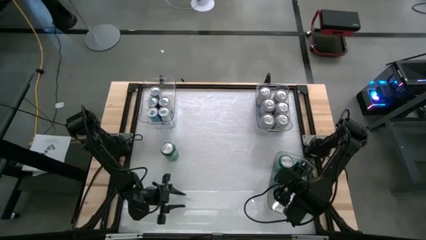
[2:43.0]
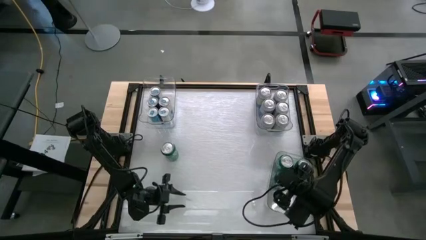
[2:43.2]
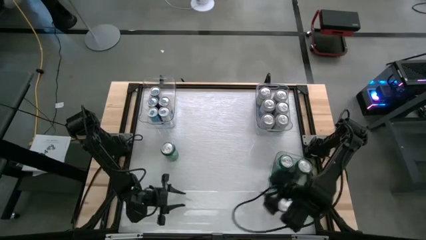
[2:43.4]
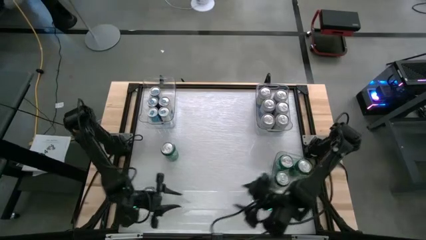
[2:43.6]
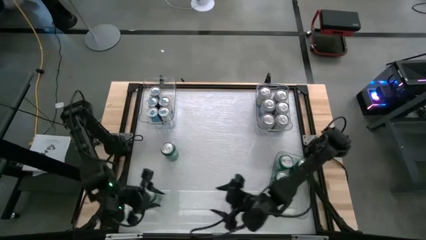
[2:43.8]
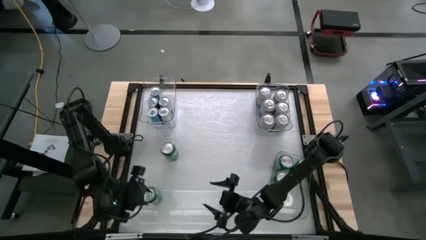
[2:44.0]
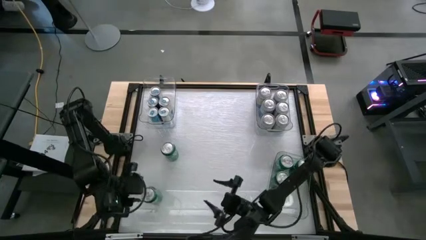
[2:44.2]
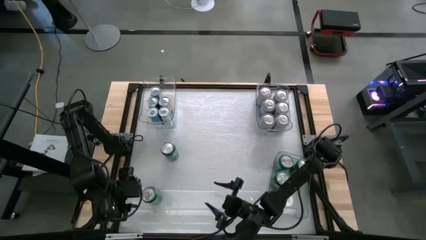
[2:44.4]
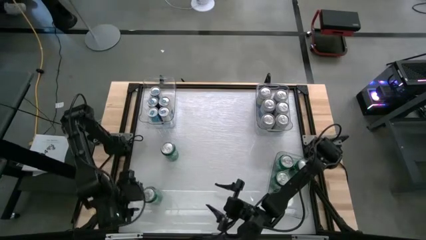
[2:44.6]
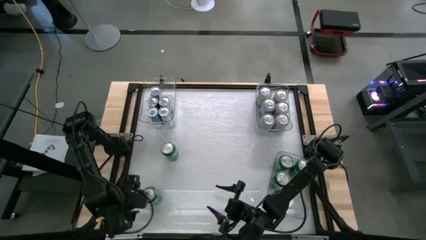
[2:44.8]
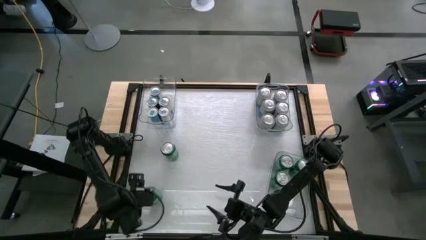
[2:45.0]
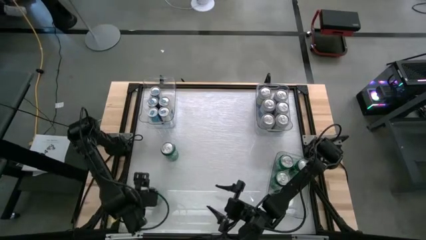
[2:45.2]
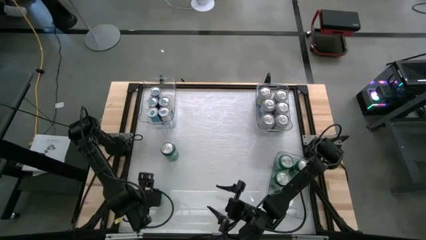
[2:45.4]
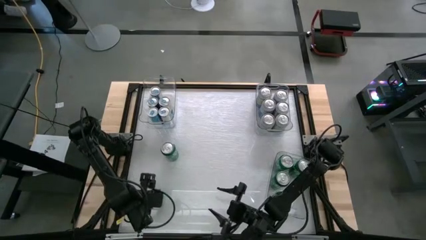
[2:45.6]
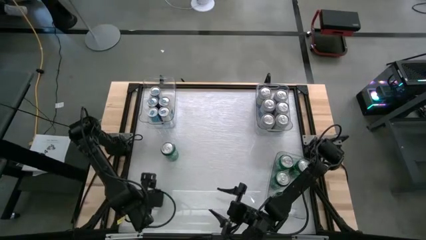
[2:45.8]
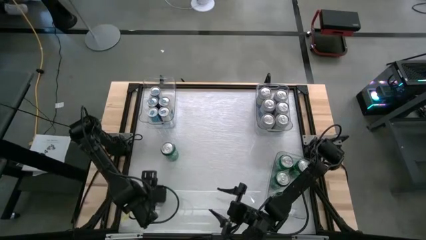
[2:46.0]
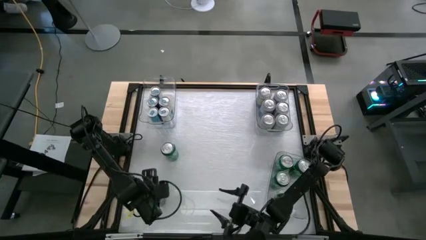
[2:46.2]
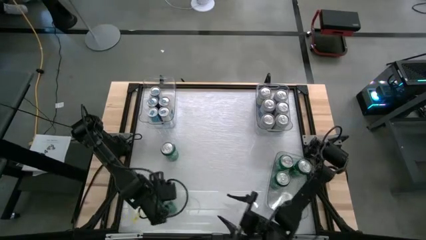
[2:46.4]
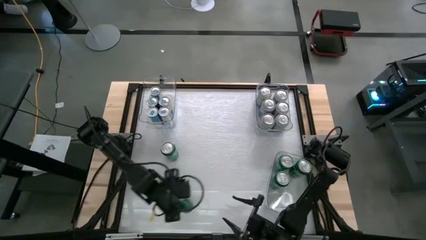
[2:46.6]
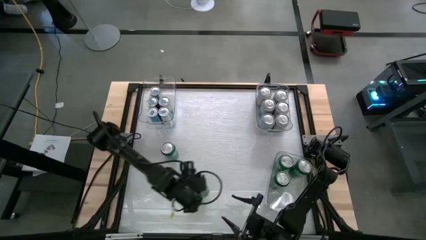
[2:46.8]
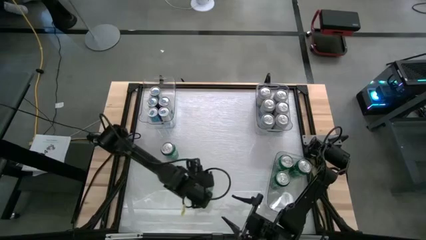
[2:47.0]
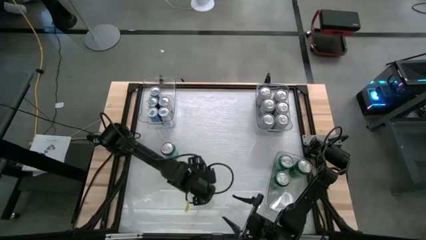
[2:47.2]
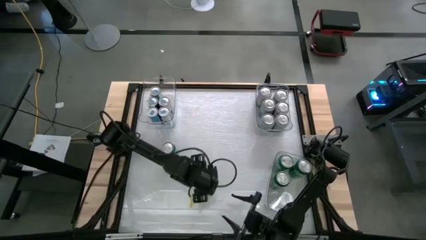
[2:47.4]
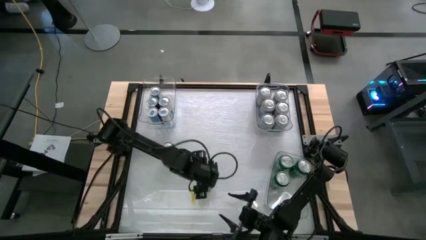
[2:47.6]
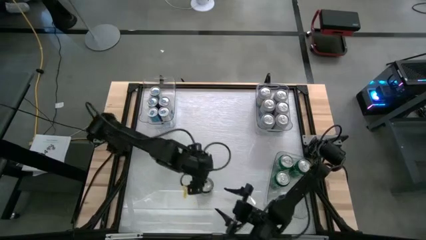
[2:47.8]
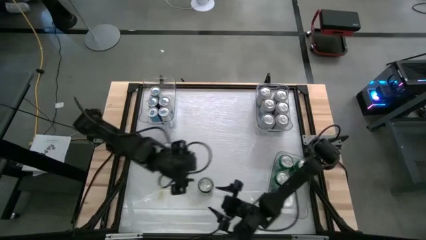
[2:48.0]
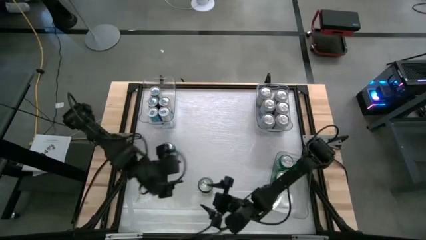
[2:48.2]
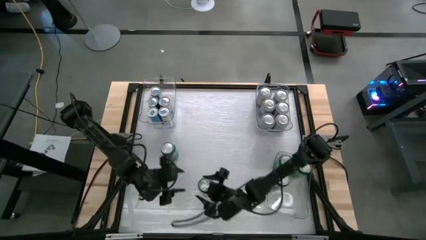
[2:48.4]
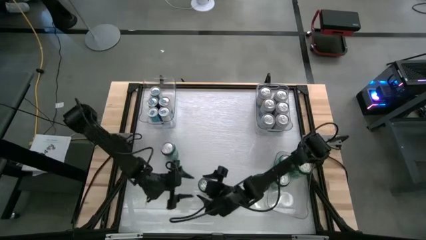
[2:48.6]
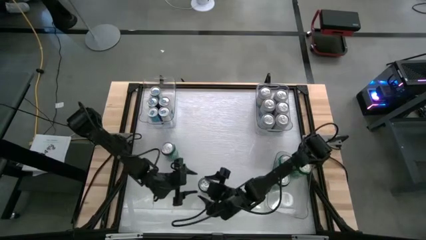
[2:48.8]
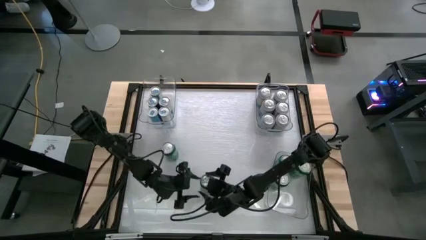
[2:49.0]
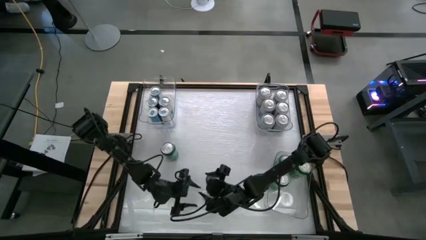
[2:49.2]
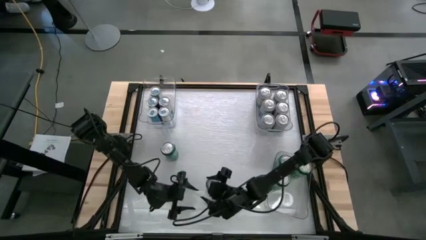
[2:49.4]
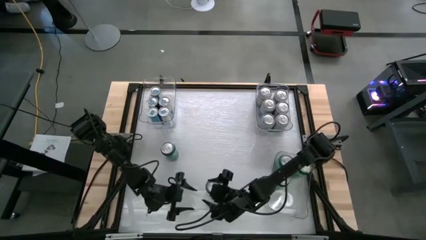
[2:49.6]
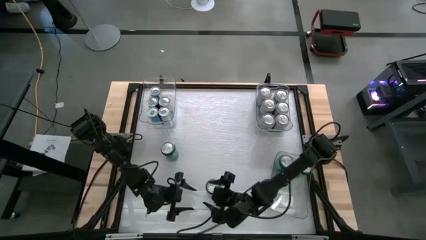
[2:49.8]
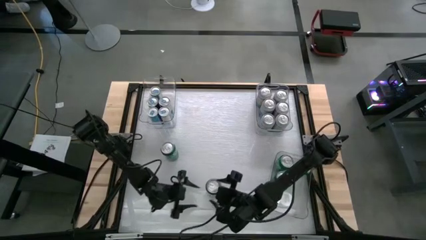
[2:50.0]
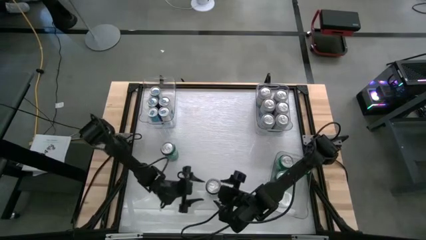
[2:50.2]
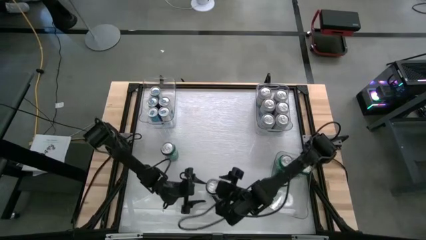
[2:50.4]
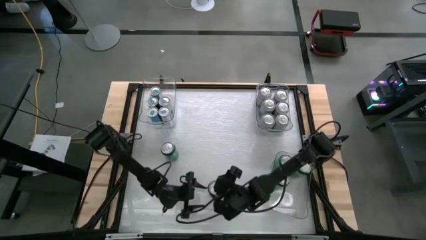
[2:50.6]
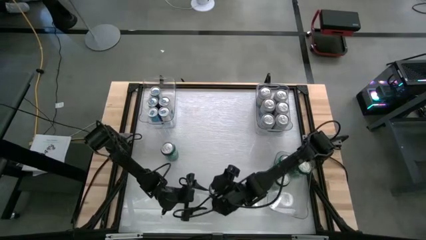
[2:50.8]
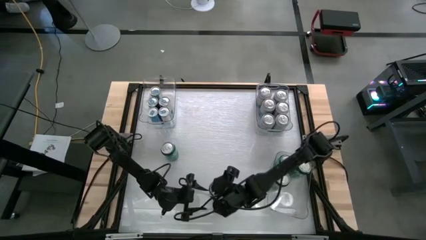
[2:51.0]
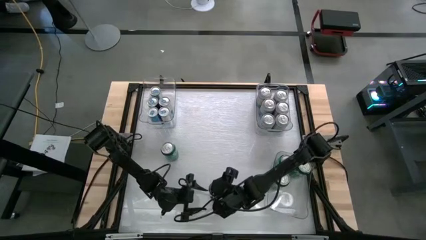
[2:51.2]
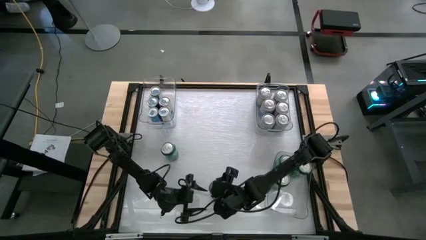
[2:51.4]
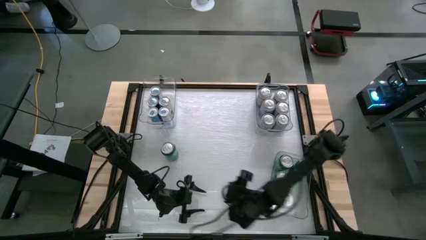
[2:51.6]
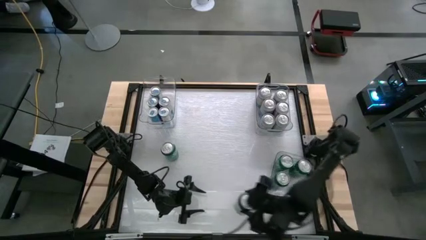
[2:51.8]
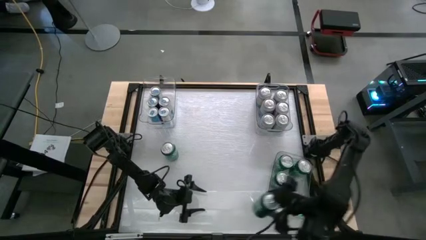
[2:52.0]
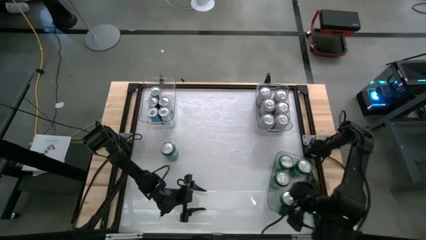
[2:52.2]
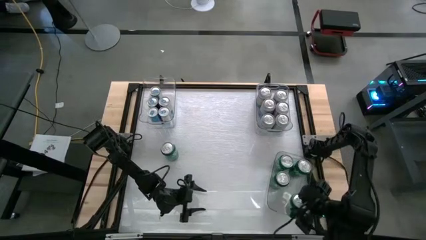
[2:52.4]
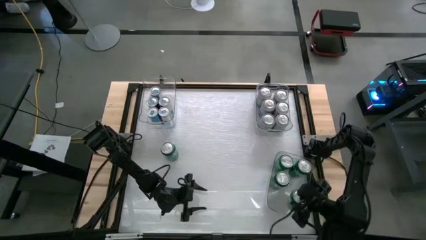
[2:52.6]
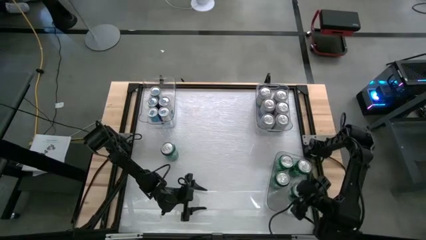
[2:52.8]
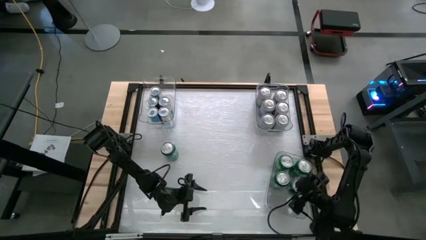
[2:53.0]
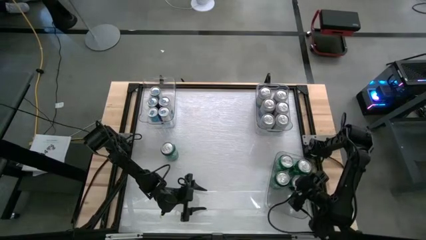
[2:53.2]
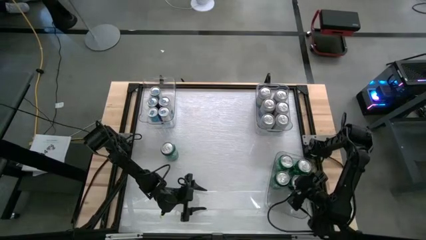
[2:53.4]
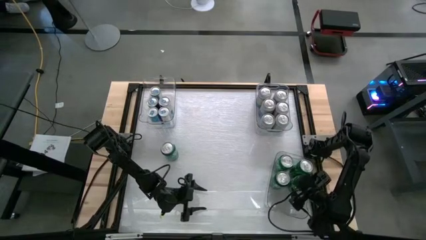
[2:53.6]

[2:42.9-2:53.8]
Task: Sort soda cans
Put the green soda can into the bottom transparent bin

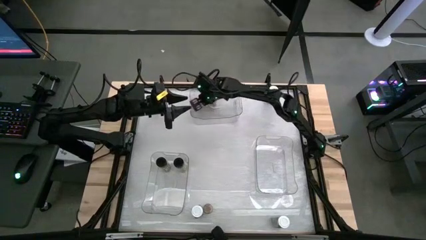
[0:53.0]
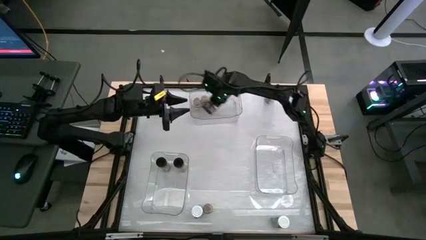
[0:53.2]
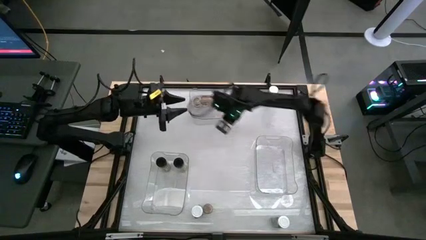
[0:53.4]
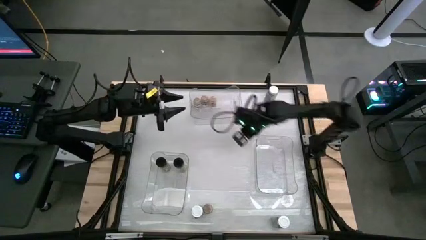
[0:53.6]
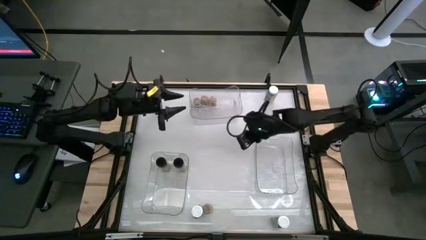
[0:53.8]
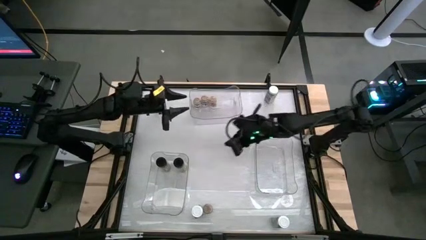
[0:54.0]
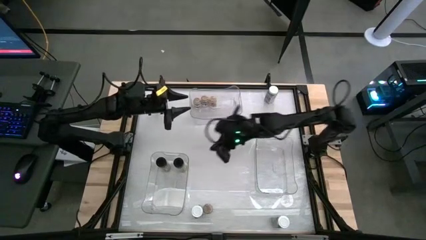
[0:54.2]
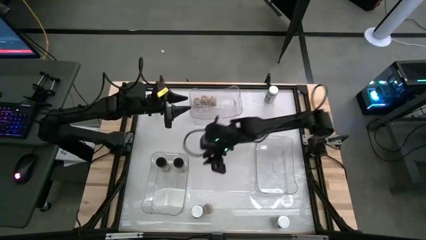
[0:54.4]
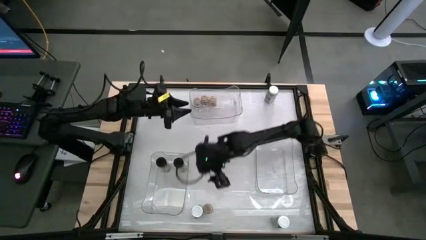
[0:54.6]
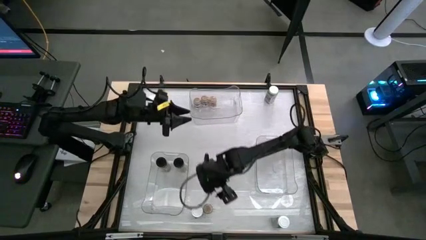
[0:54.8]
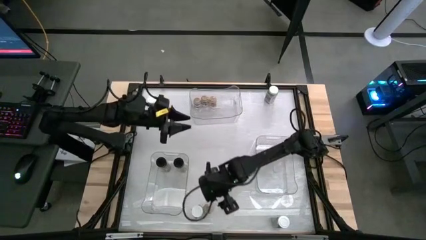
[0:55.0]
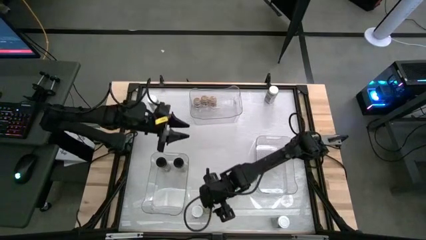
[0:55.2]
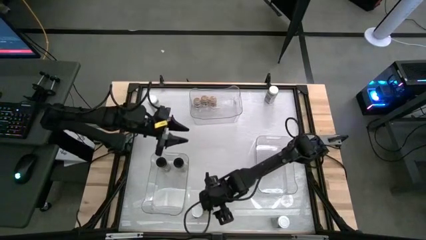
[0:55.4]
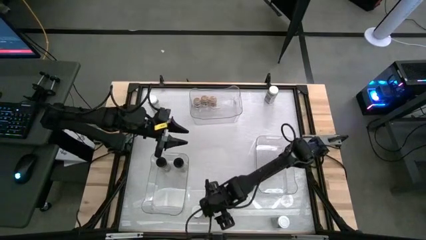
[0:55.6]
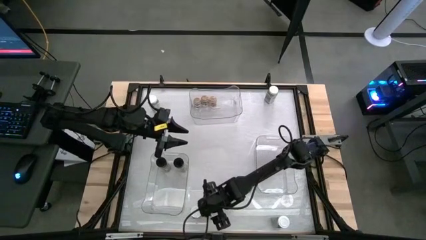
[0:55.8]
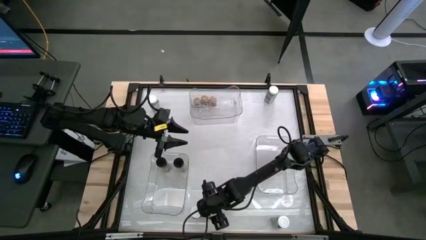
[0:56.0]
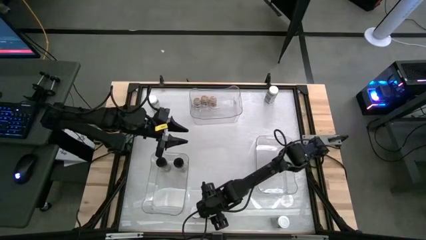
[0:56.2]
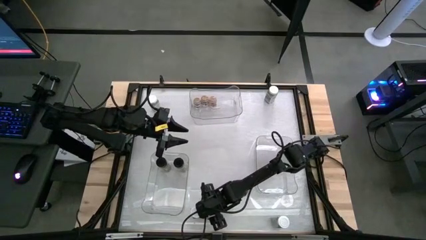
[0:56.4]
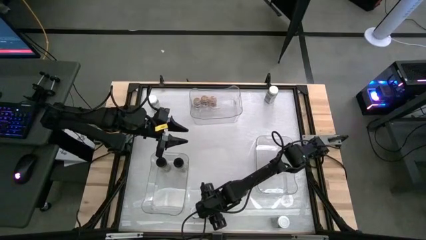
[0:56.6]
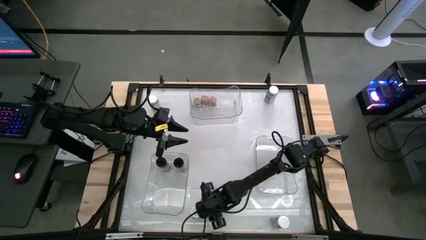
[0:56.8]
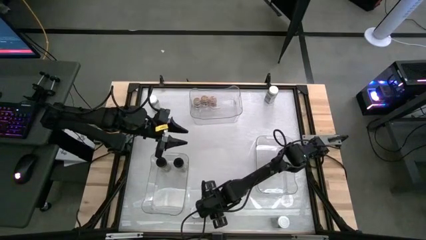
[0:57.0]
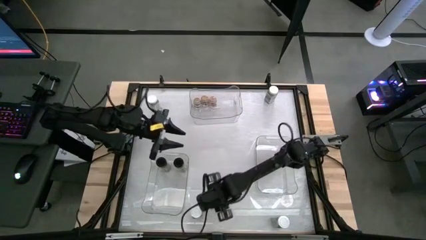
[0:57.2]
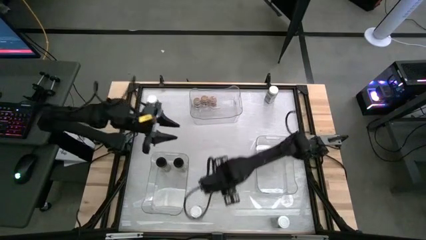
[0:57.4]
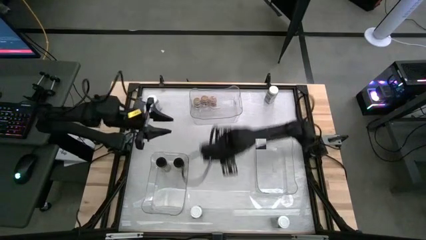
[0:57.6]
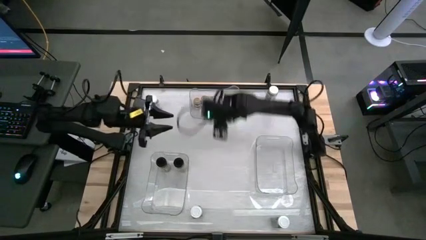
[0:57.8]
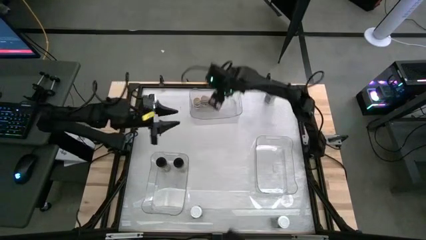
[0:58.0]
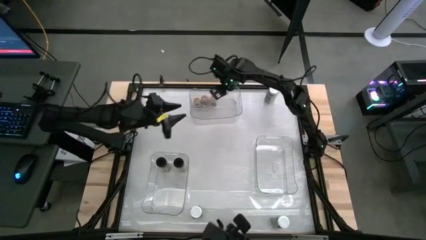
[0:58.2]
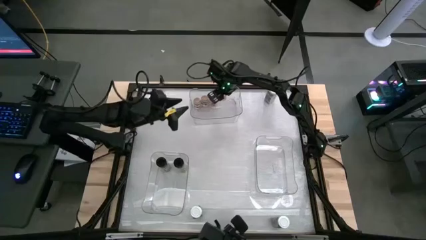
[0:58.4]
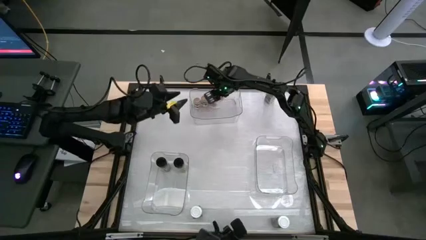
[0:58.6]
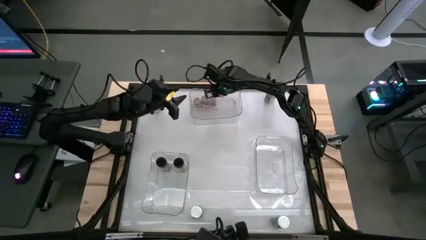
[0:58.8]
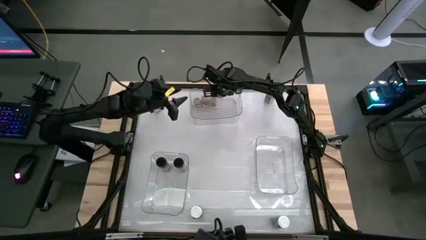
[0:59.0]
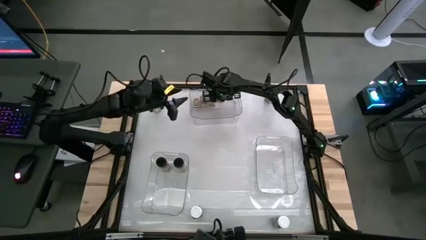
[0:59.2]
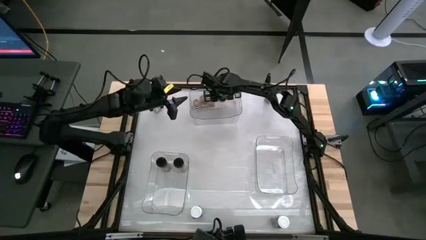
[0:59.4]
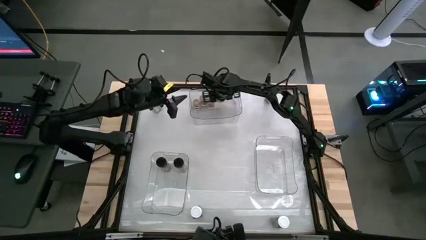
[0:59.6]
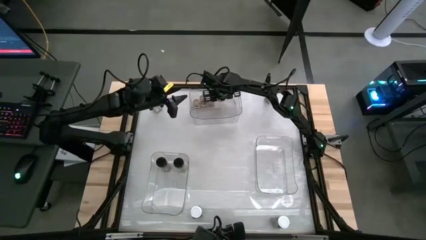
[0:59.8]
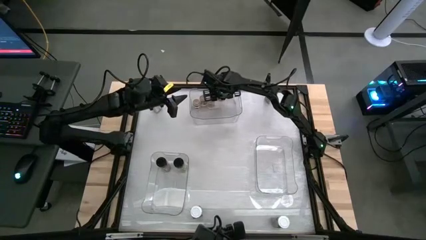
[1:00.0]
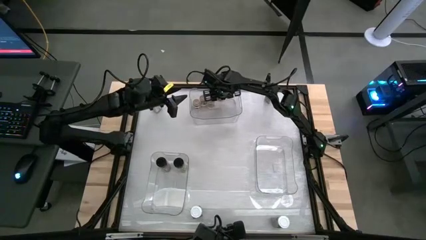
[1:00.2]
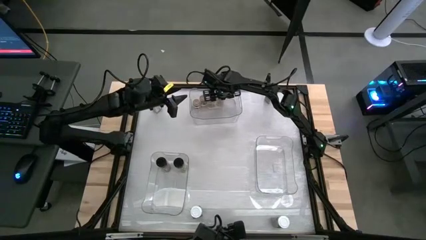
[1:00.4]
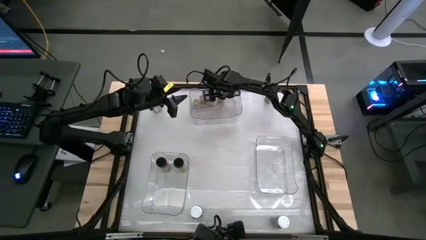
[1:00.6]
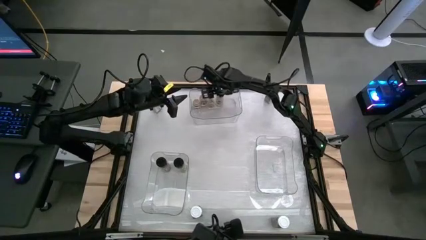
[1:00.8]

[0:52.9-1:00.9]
Task: Sort spices by type
Put the brown seasoning bottle into the middle transparent bin
